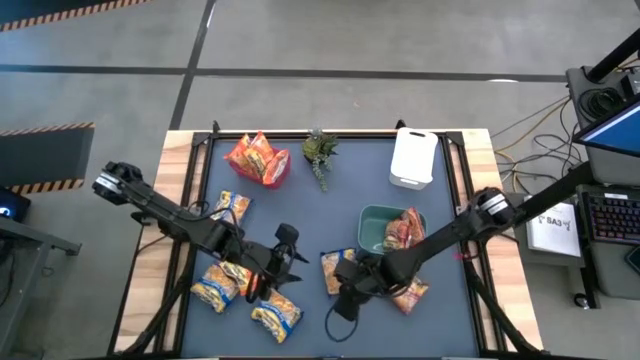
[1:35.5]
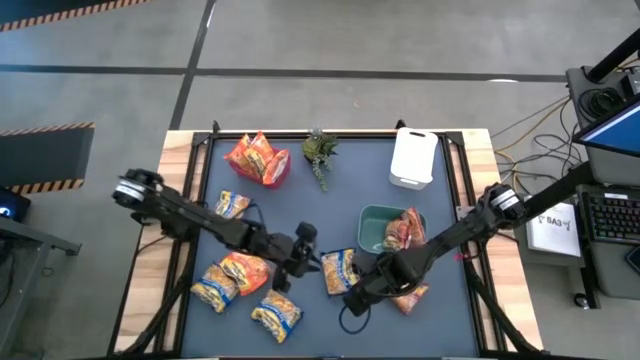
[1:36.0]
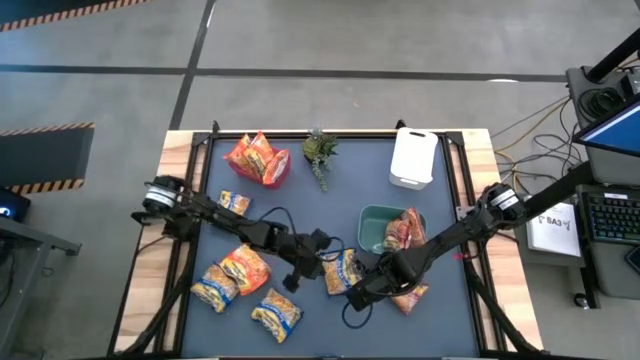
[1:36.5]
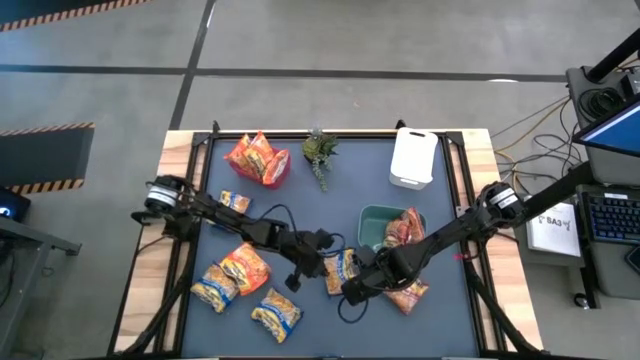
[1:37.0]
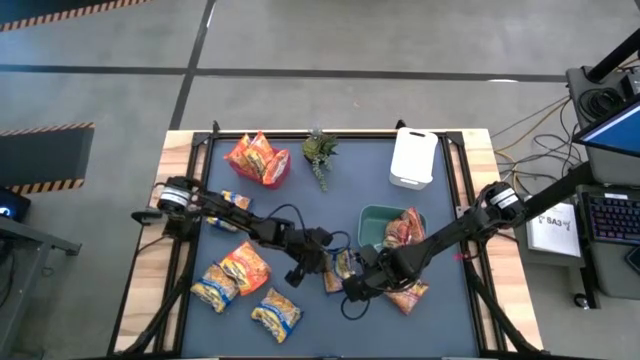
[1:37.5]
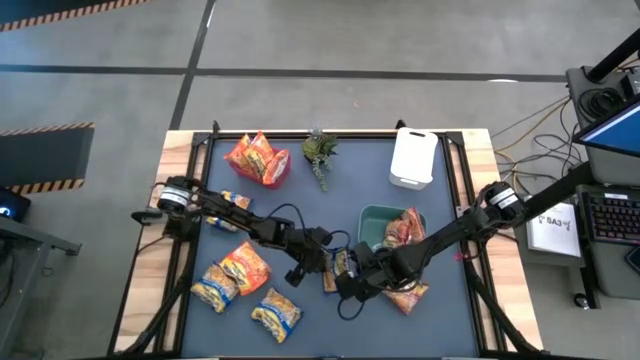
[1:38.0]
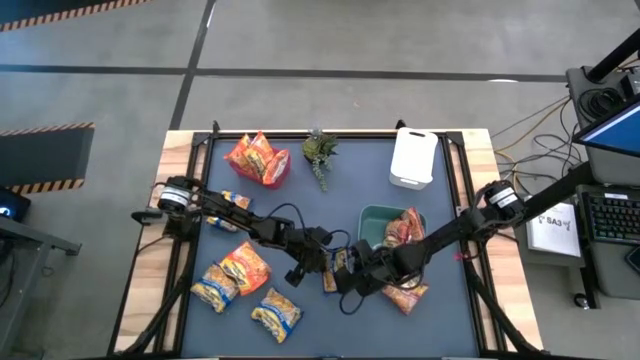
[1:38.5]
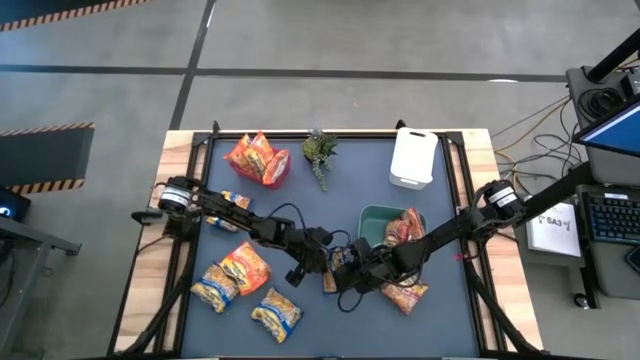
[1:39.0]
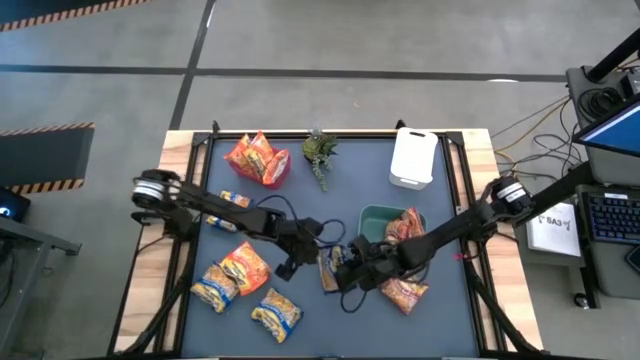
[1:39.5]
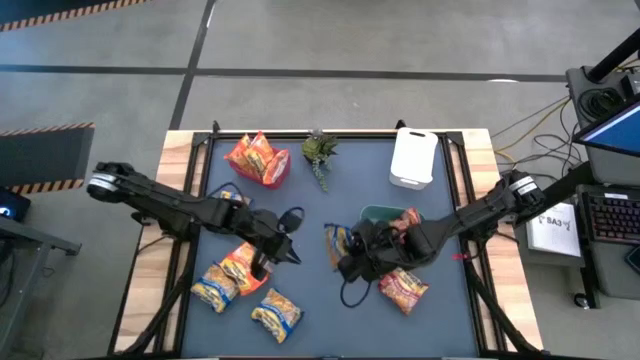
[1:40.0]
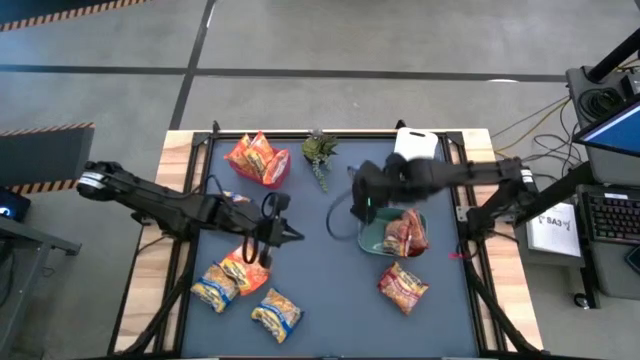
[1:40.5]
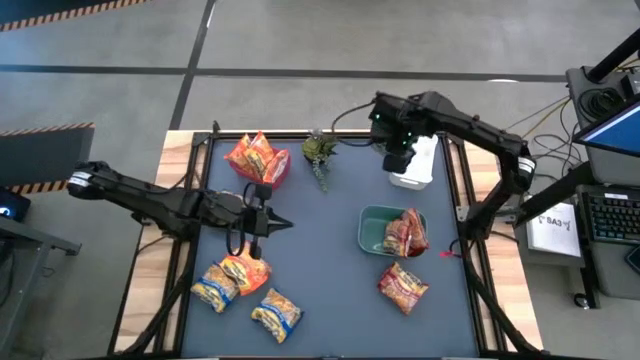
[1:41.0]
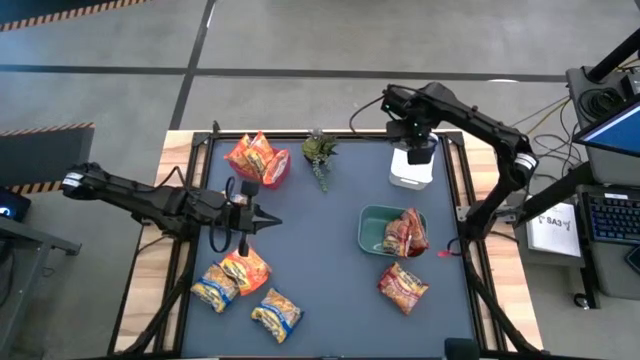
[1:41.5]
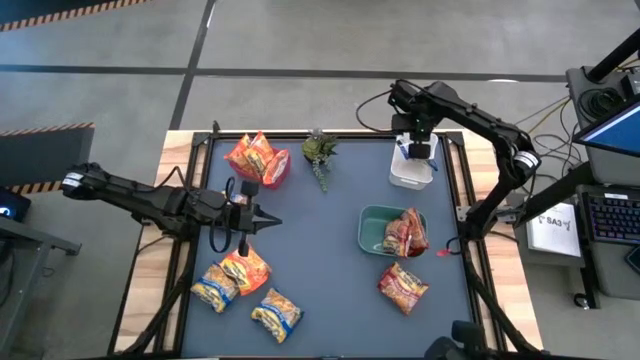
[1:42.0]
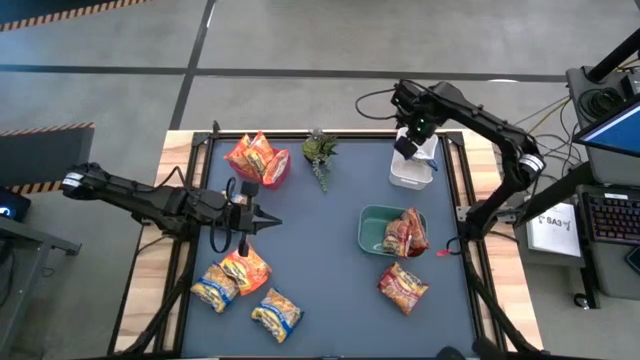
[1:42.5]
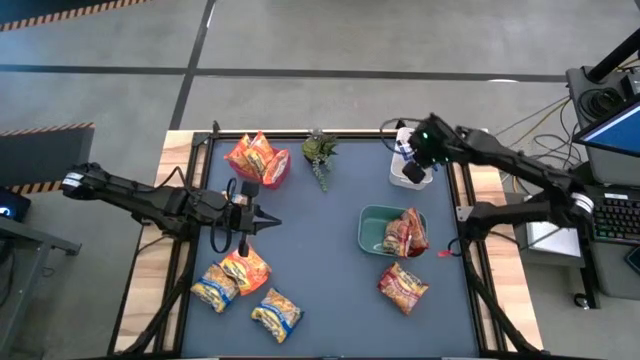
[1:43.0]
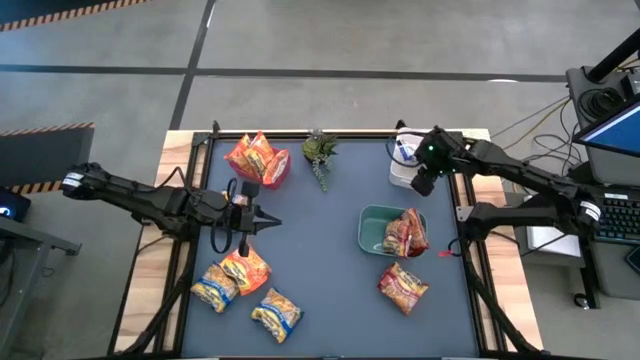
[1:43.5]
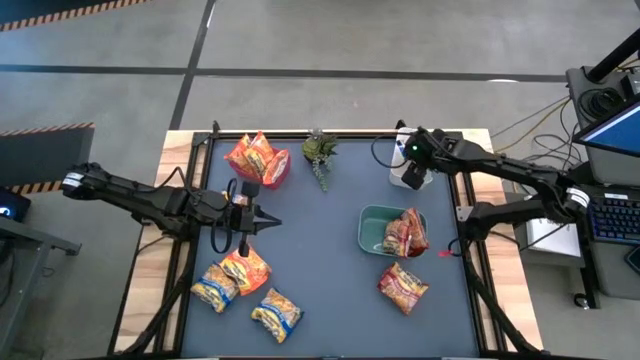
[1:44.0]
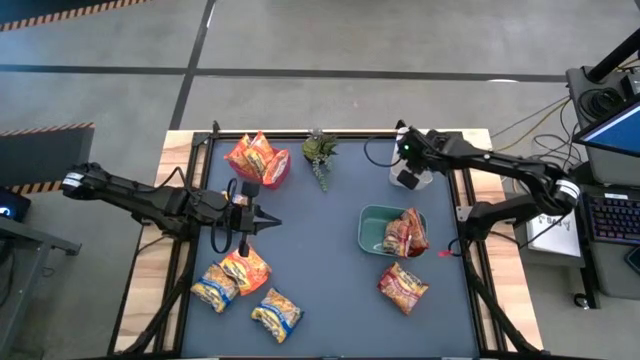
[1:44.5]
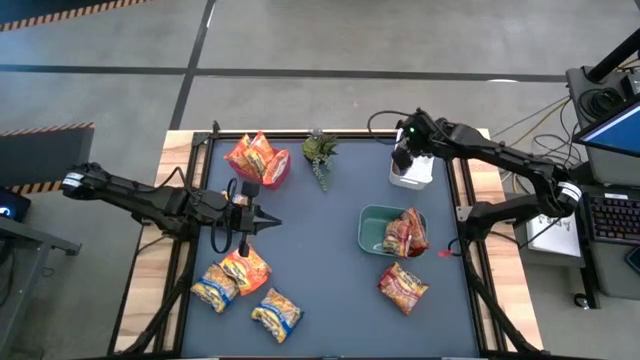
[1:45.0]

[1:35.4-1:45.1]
Task: Sort Maruchan noodles
Put the blue noodle pack into the white bin

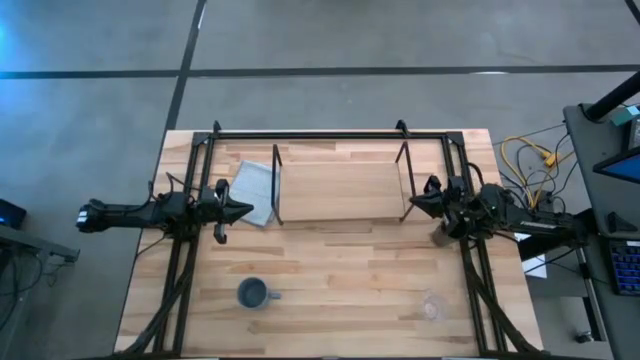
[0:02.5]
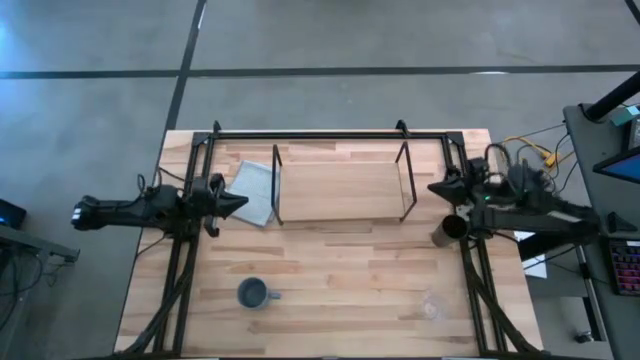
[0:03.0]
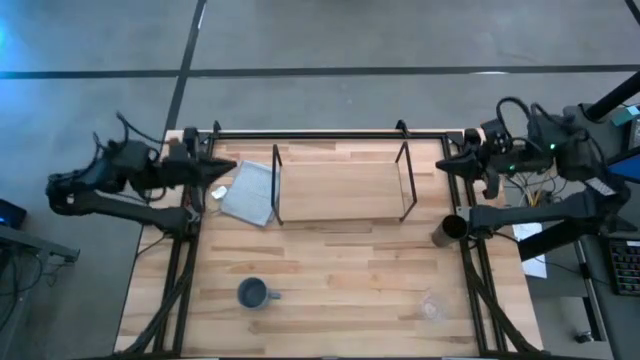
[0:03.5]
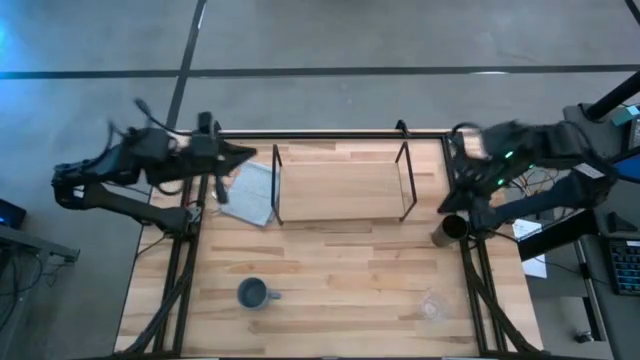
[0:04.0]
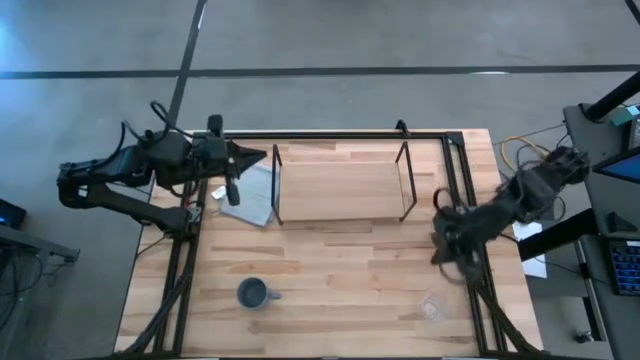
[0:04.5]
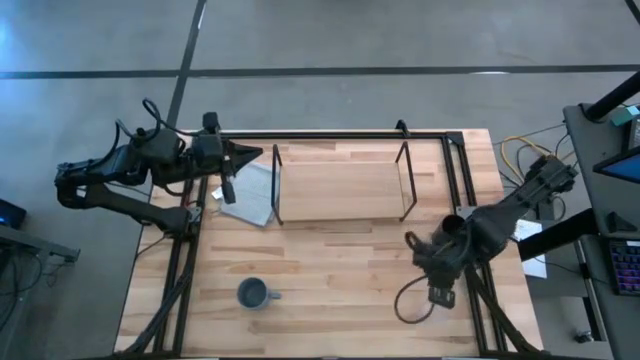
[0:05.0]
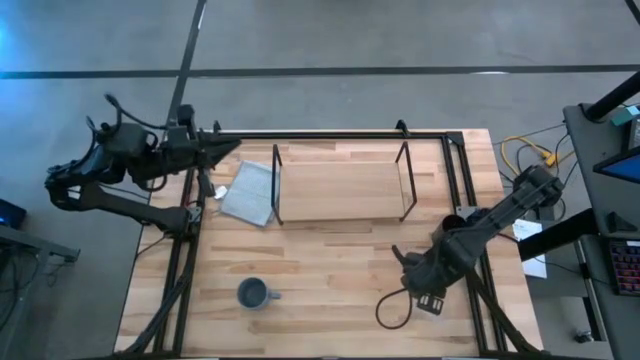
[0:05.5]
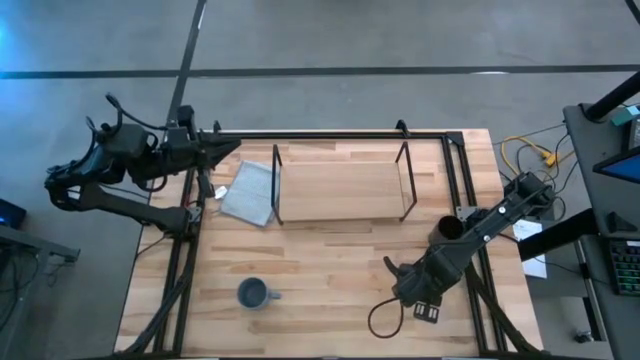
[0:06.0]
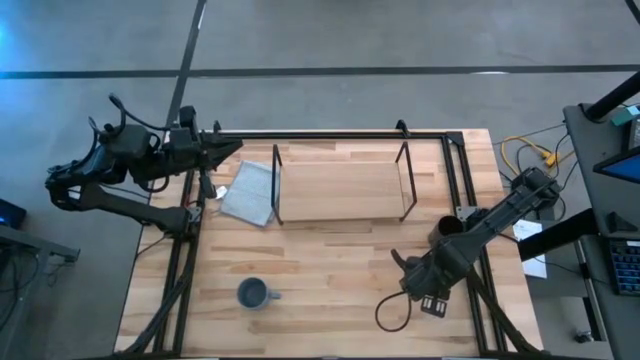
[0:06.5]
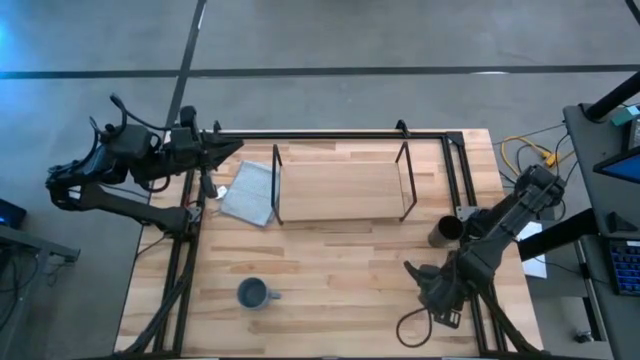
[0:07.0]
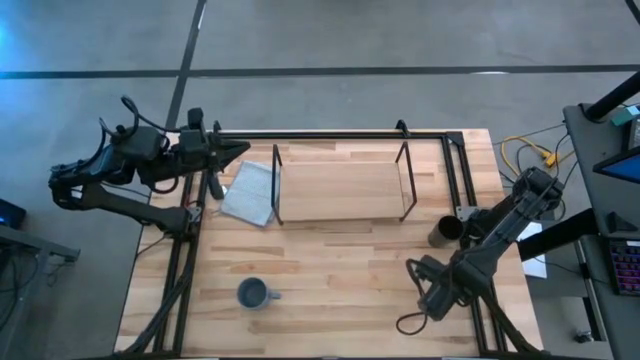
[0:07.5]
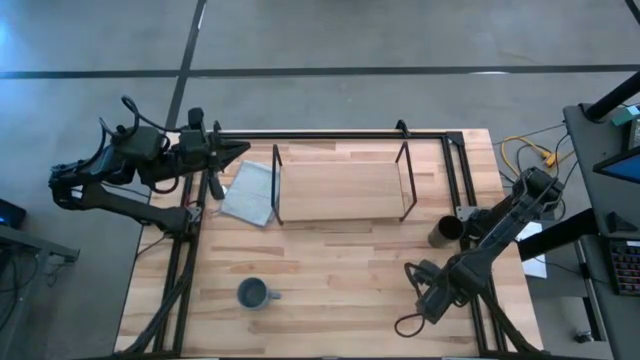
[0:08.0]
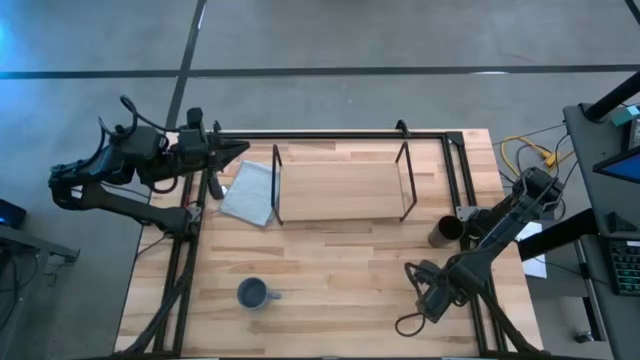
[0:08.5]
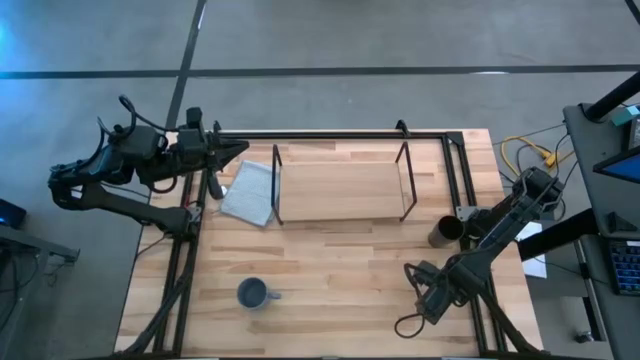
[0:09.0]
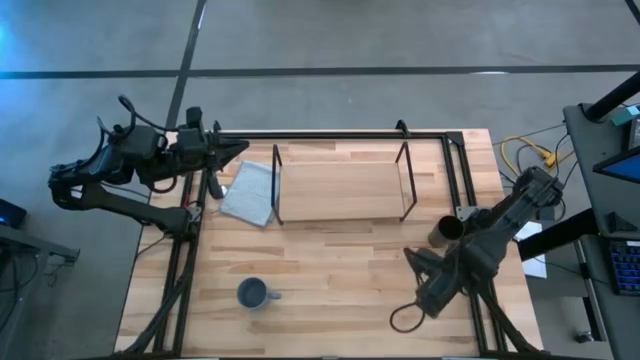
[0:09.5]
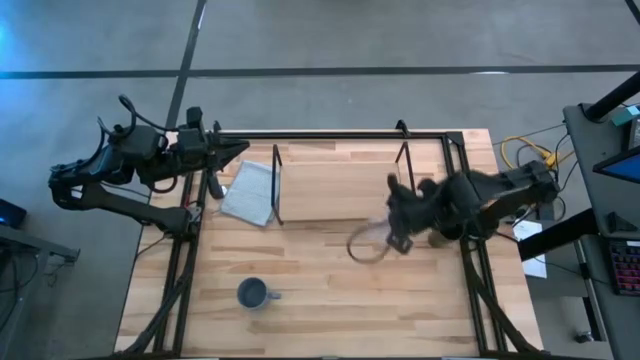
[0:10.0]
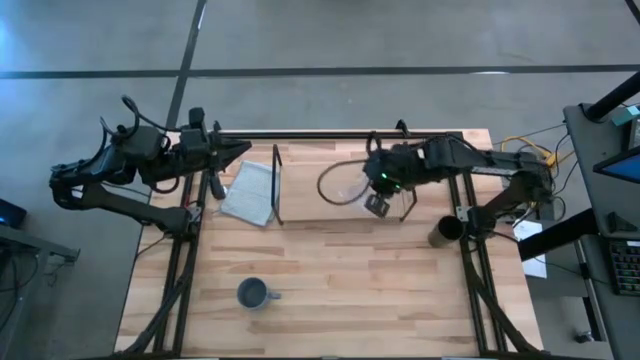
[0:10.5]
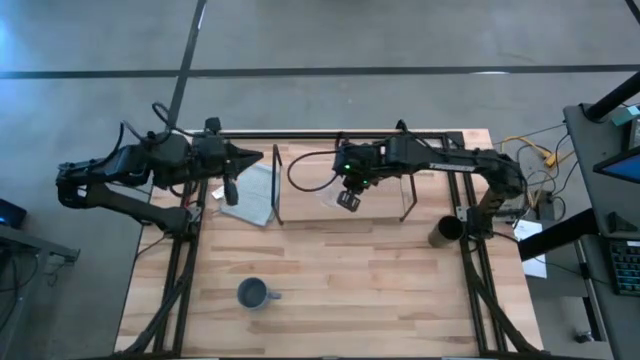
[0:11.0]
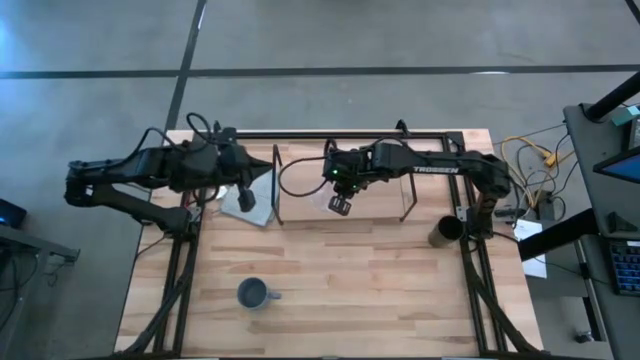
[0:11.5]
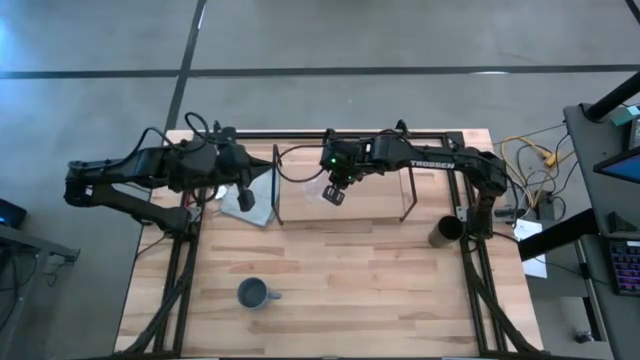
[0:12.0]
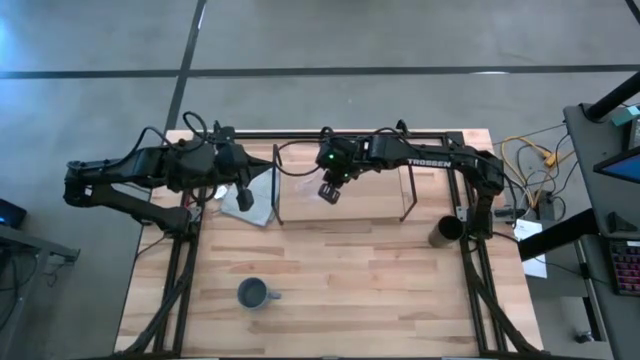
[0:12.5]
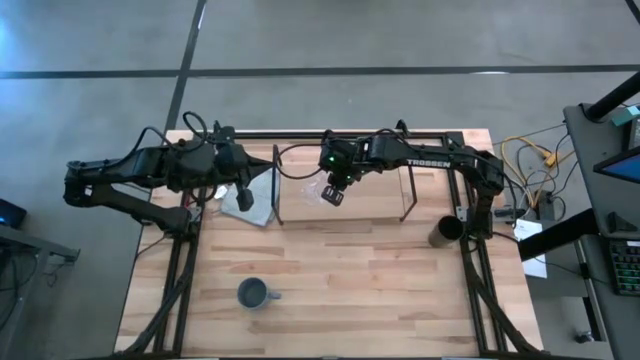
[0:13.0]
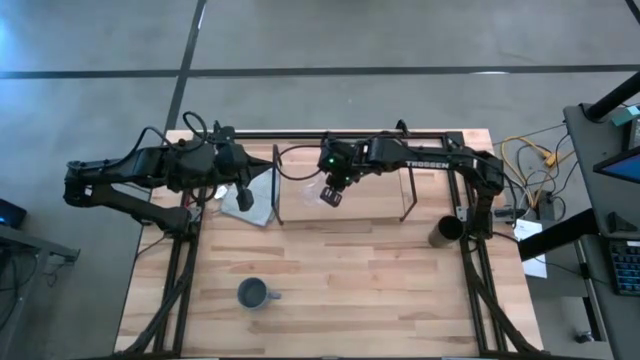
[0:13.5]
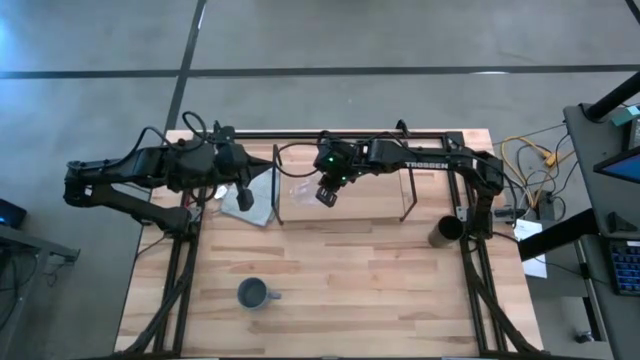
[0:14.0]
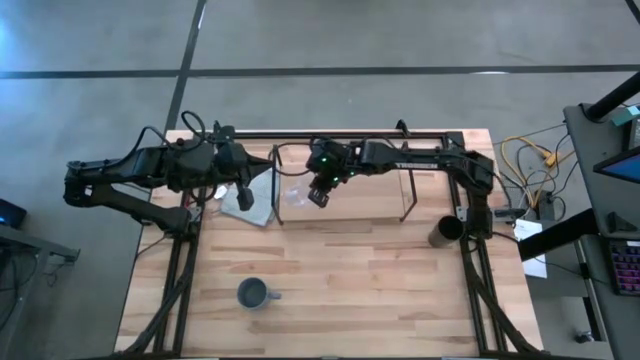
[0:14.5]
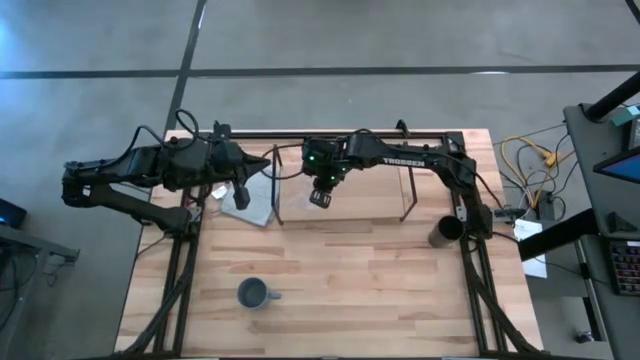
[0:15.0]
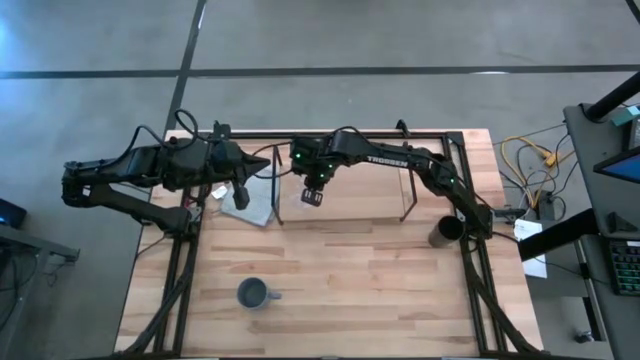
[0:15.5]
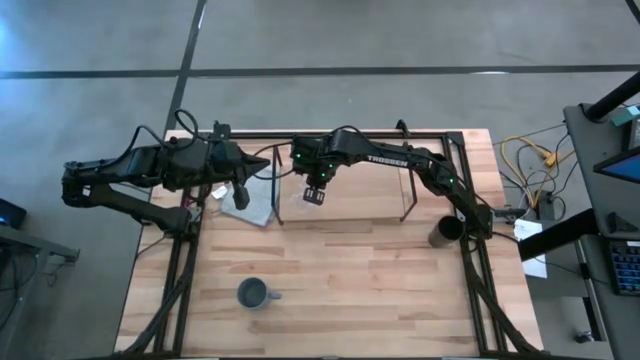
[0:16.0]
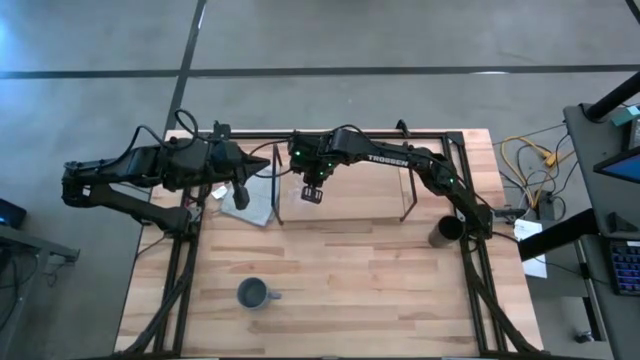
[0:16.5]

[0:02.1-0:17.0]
Task: Stack small to large cups/mugs on shelf
Put the transparent mug on the shelf
